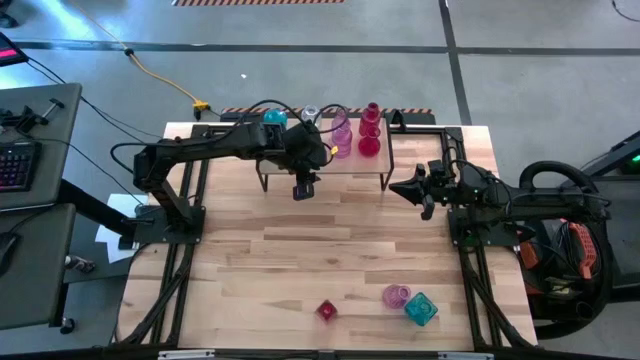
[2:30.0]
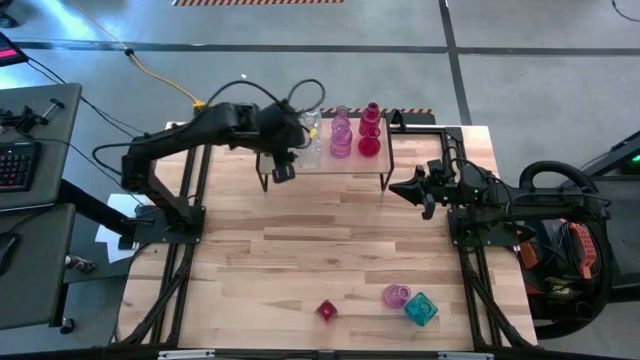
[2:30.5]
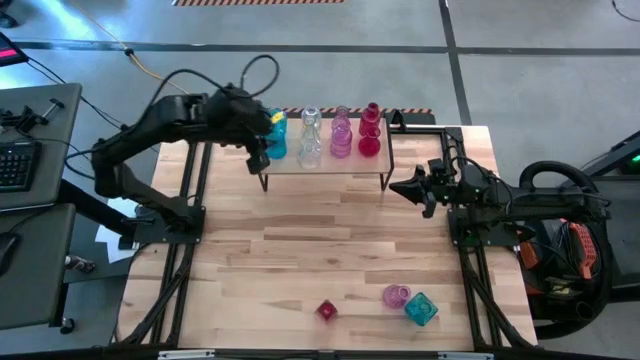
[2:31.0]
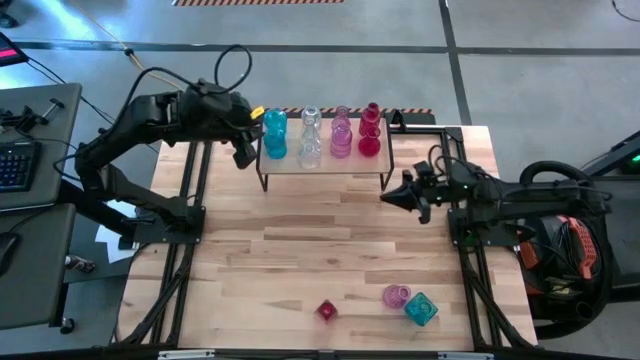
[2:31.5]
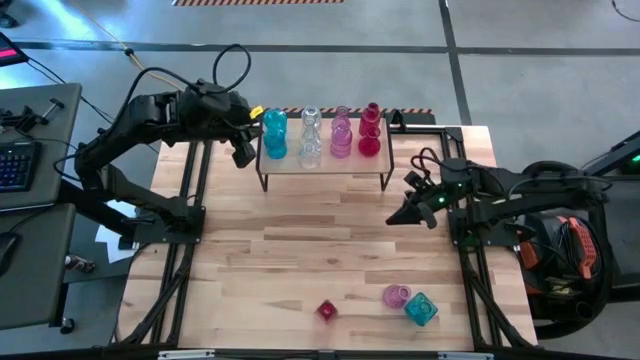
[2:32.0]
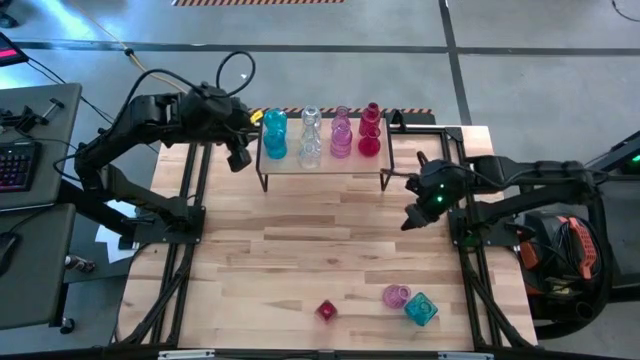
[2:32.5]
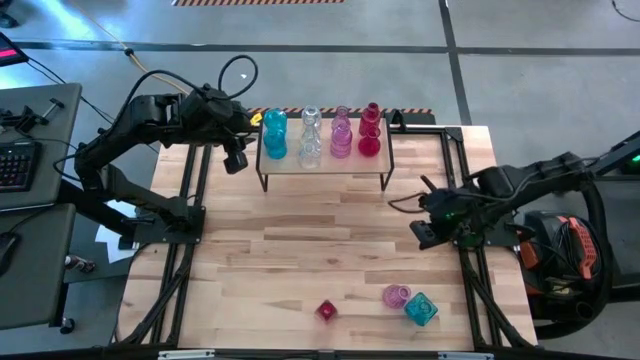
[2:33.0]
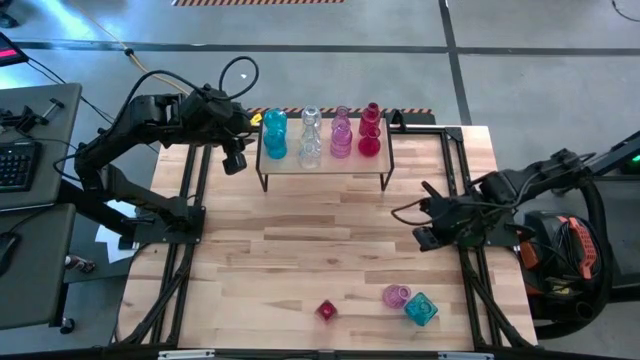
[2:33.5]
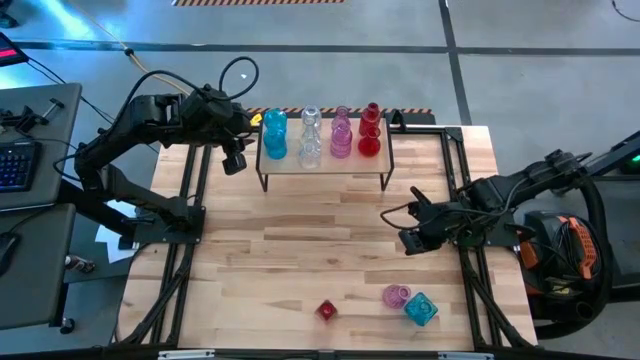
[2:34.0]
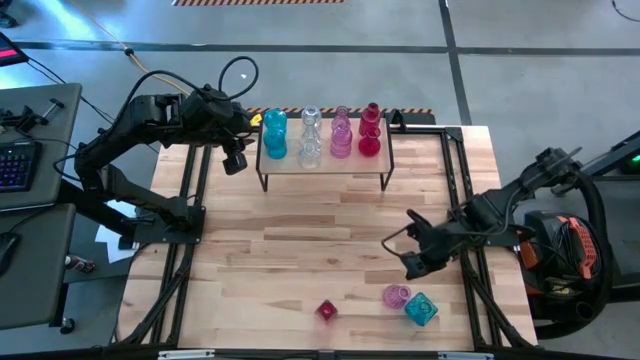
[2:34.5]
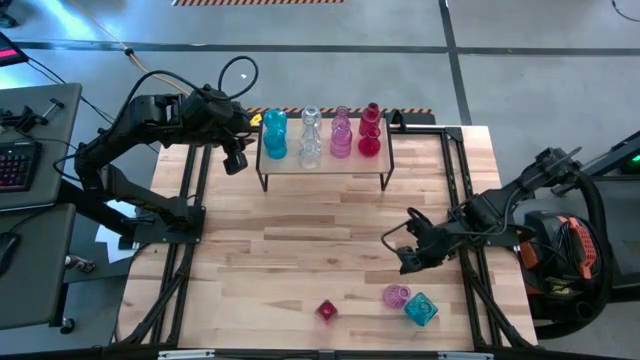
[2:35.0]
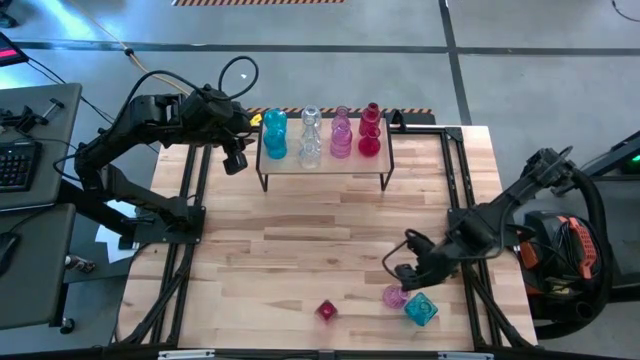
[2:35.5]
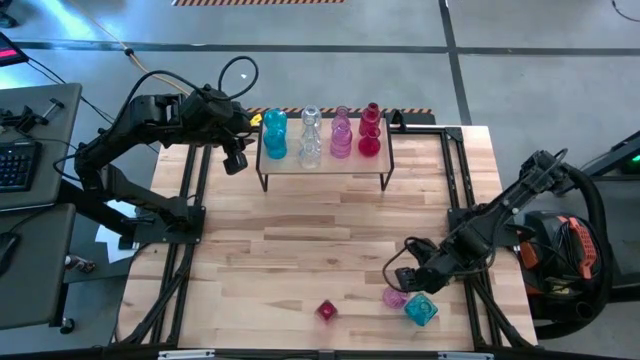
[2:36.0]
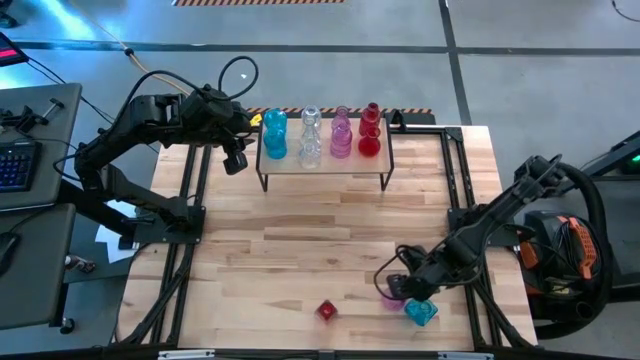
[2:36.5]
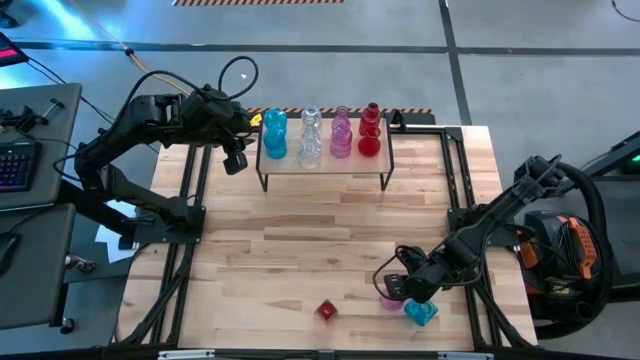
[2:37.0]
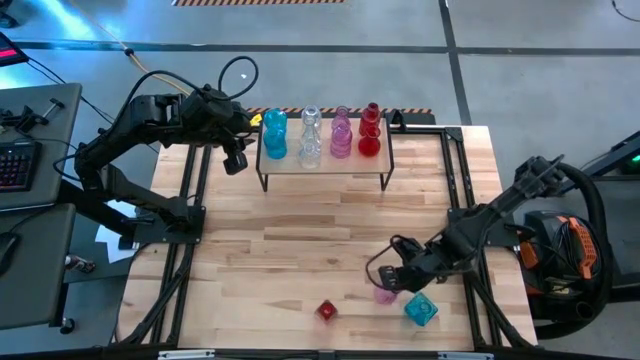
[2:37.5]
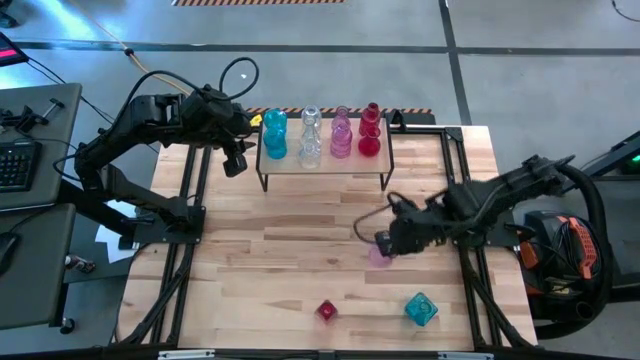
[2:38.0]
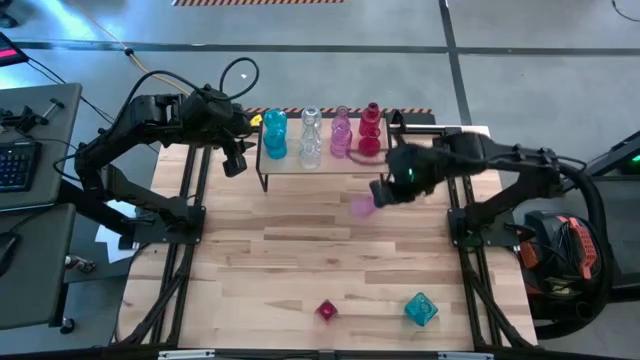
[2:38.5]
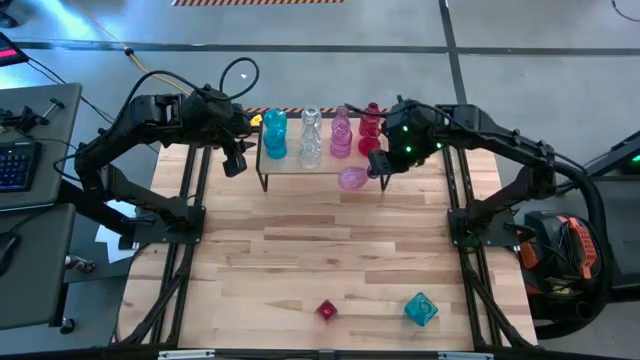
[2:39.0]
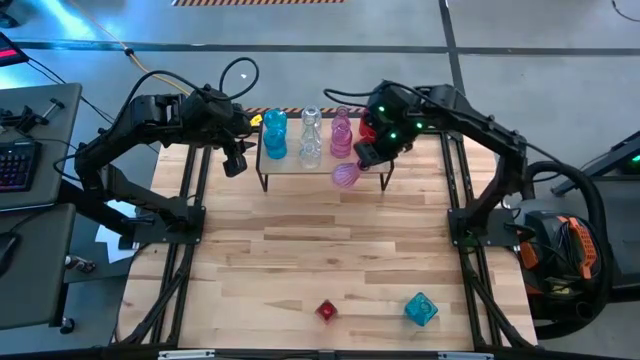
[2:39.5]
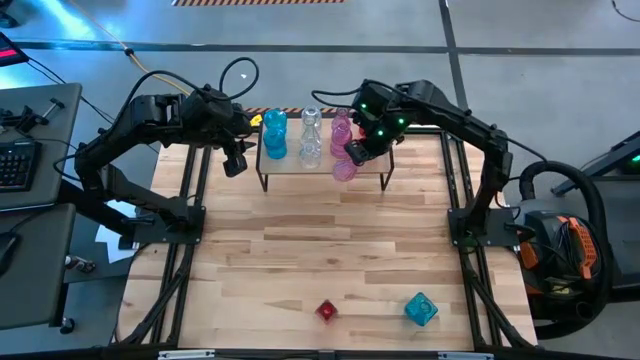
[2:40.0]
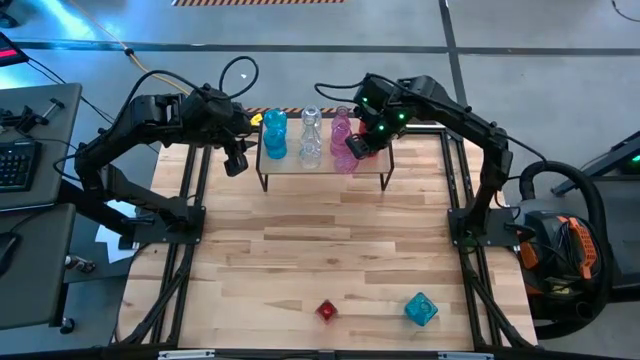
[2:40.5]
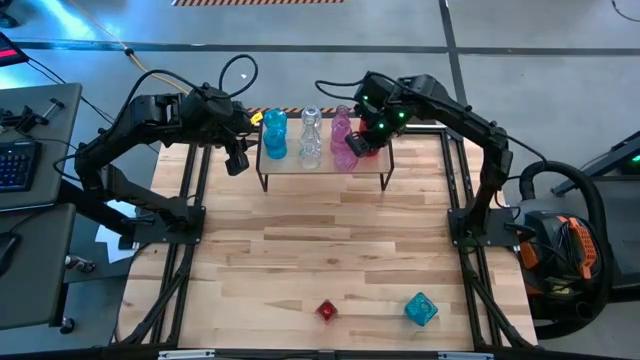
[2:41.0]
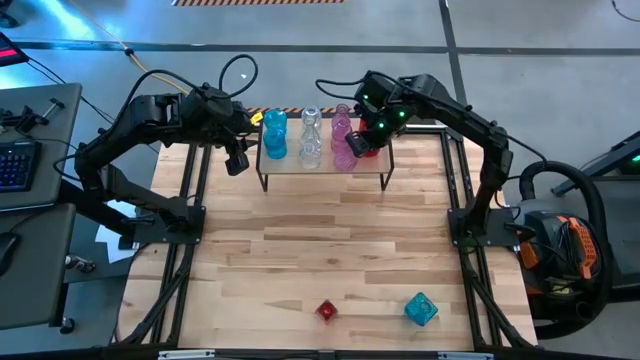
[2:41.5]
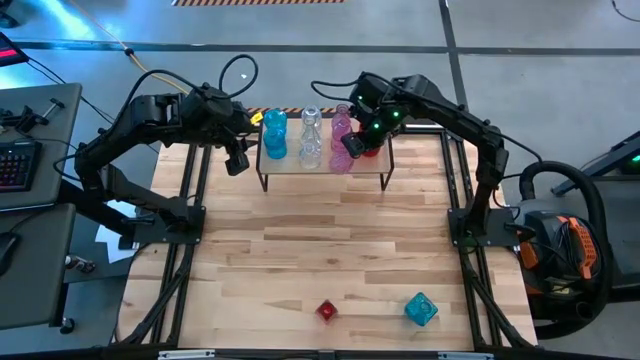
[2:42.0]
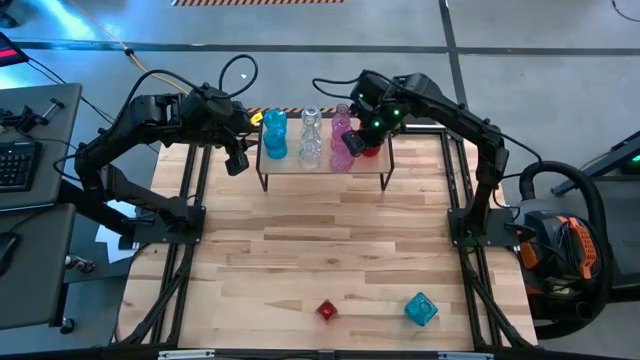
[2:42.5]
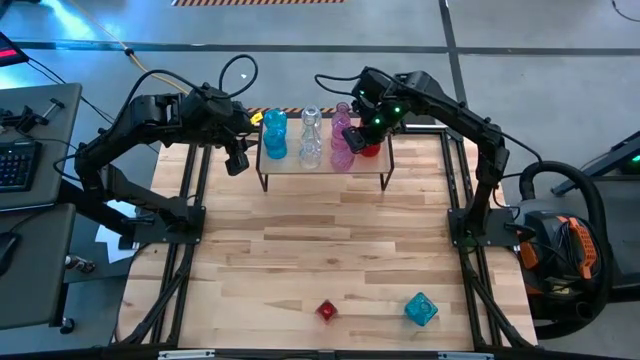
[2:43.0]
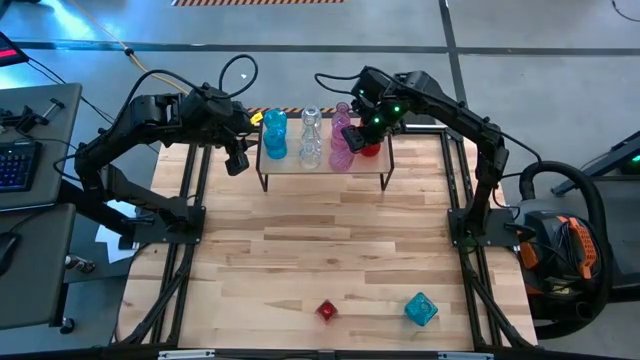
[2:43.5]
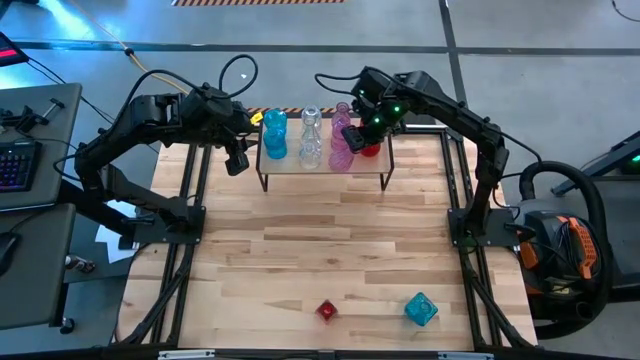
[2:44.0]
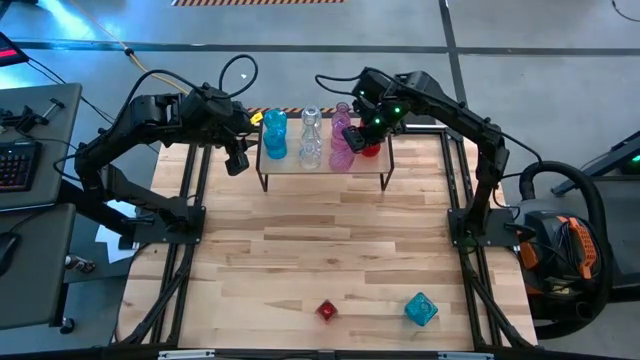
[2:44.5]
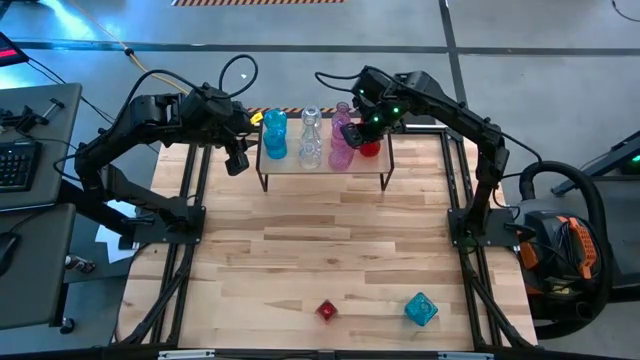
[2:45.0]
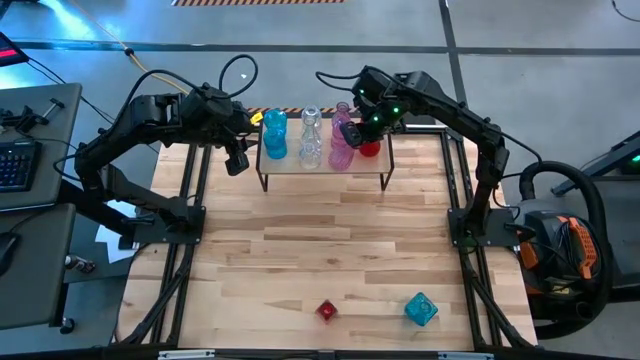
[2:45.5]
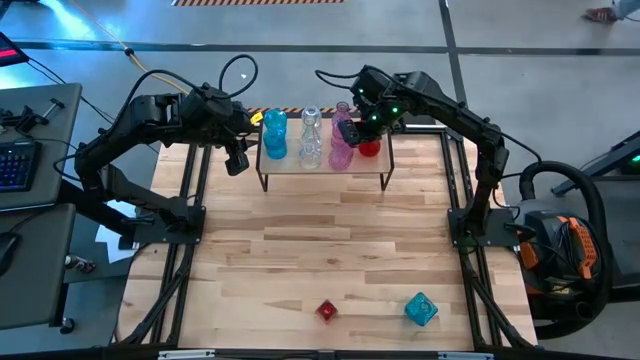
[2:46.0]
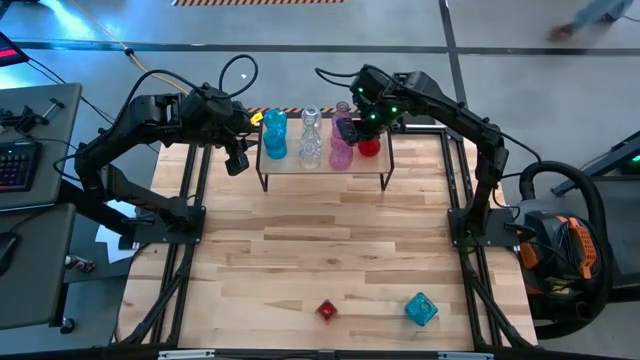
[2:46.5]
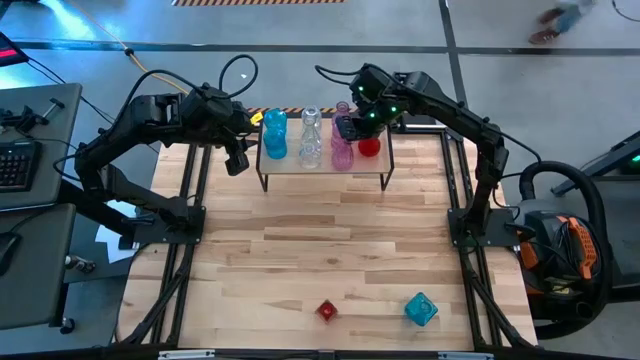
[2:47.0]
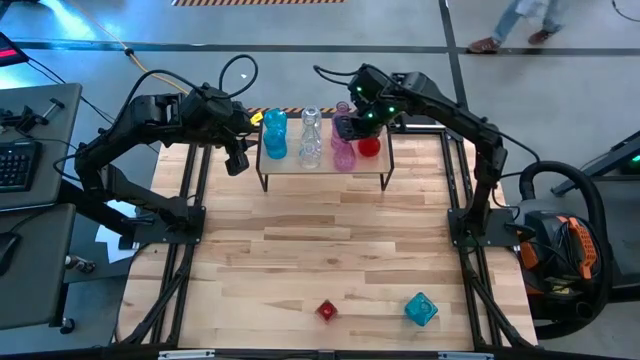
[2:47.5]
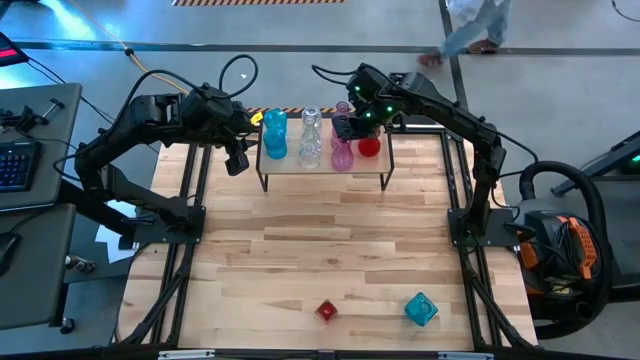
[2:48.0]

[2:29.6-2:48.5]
Task: sort vases onto shelf
Put the violet vase on the shelf aligned with the other violet vase

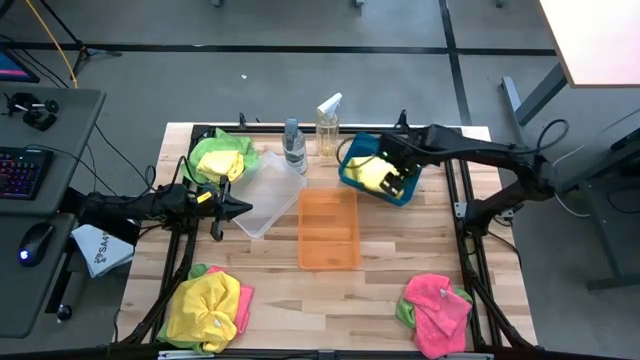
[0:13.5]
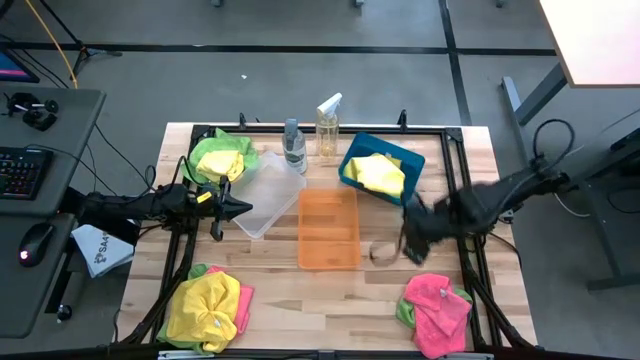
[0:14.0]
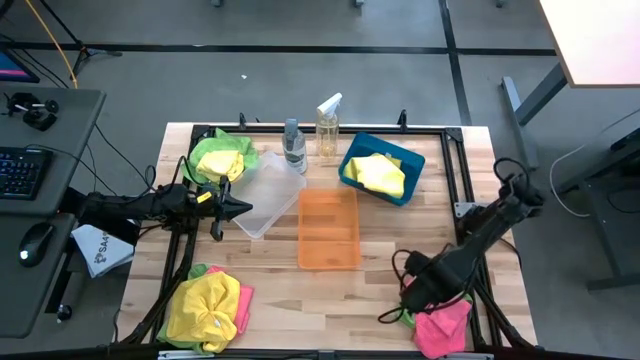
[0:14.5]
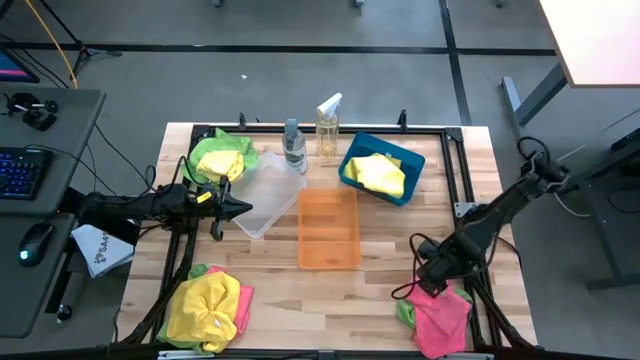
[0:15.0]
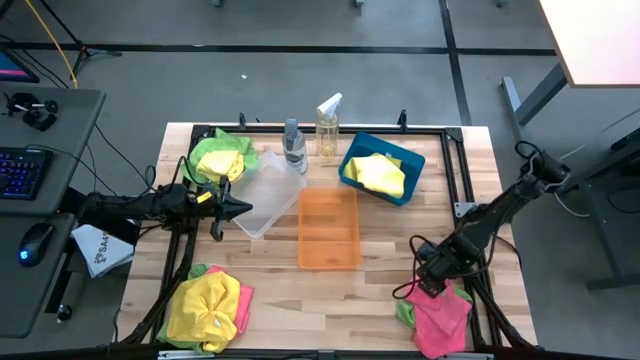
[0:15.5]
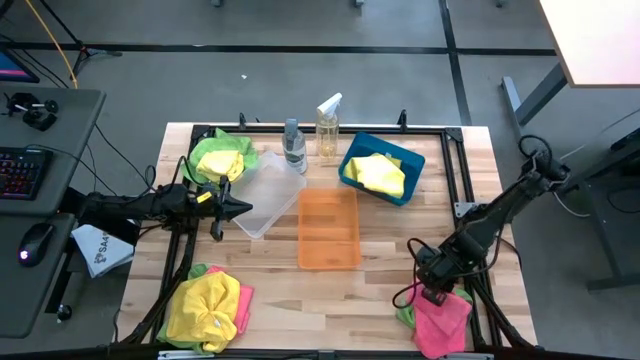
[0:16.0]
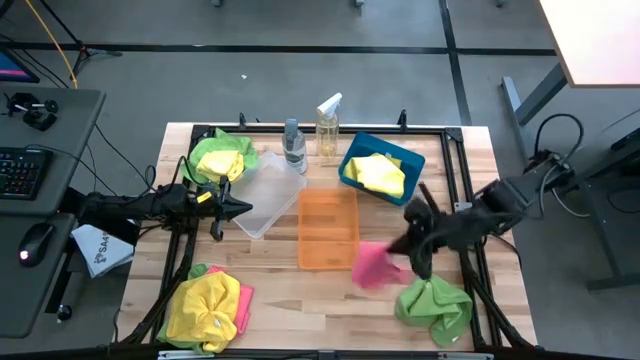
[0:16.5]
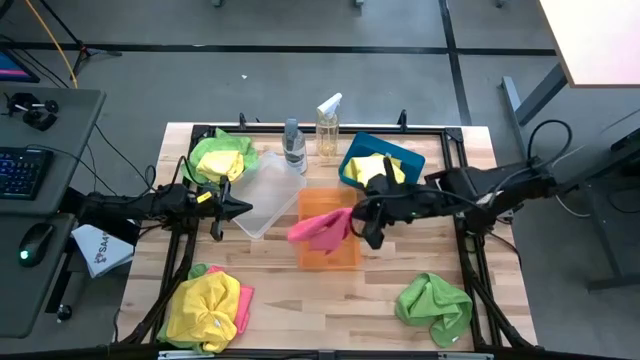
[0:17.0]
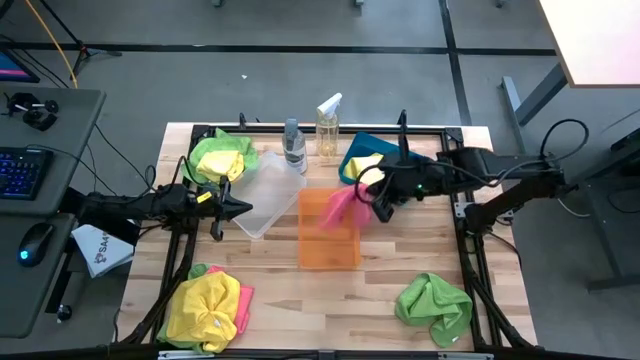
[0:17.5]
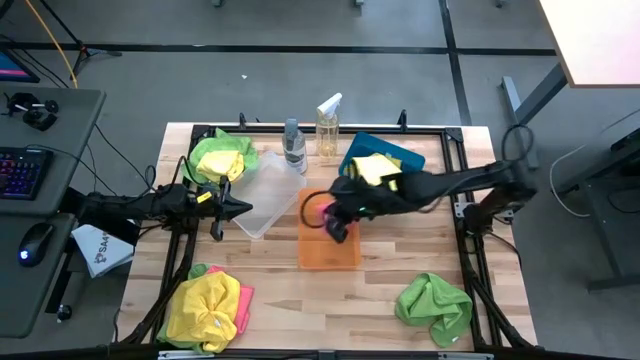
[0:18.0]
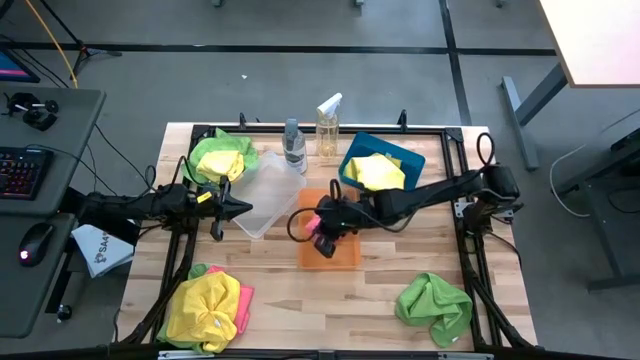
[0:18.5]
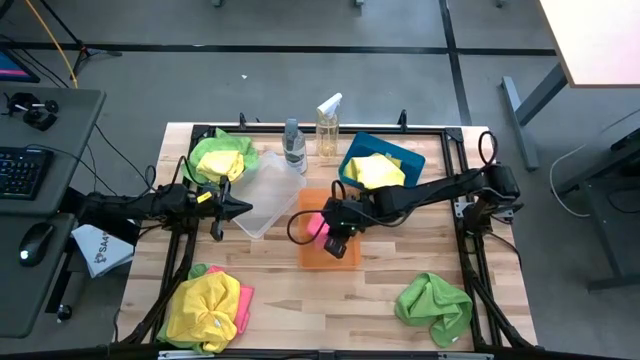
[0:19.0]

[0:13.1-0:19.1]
Task: Sort microfiber towel by color & place in baskets
Put the right pink towel into the orange bin
